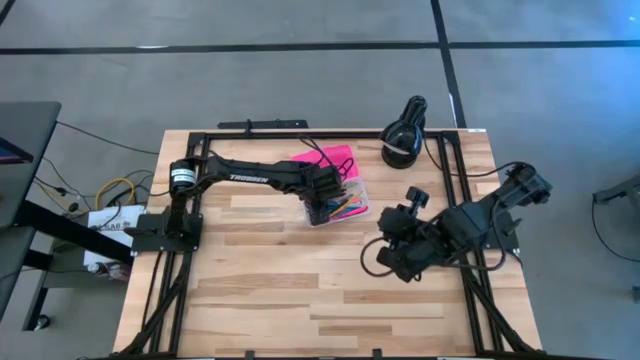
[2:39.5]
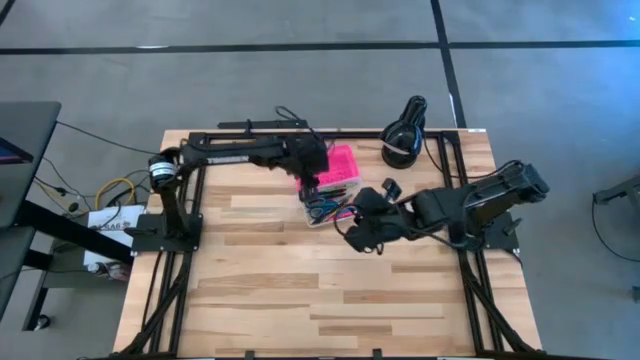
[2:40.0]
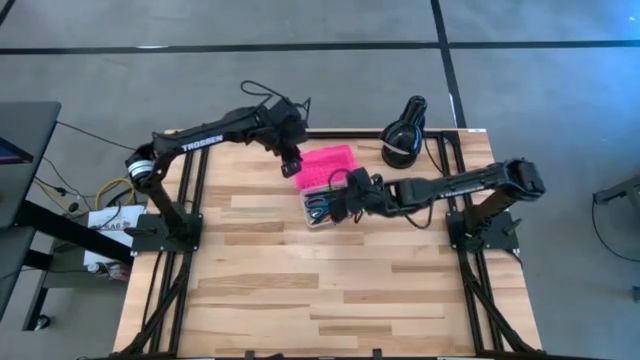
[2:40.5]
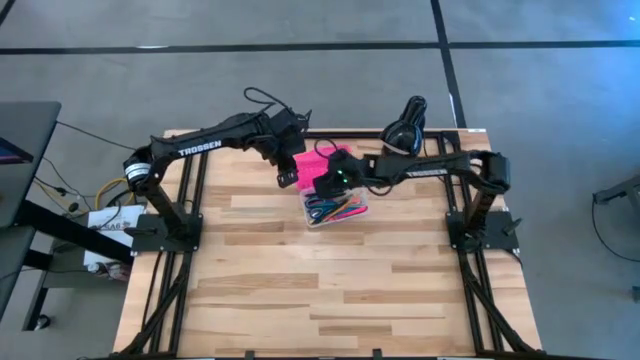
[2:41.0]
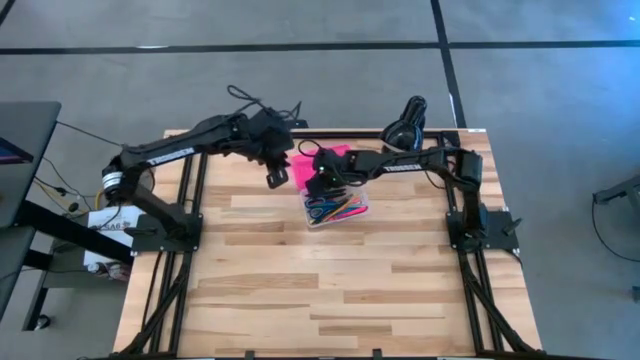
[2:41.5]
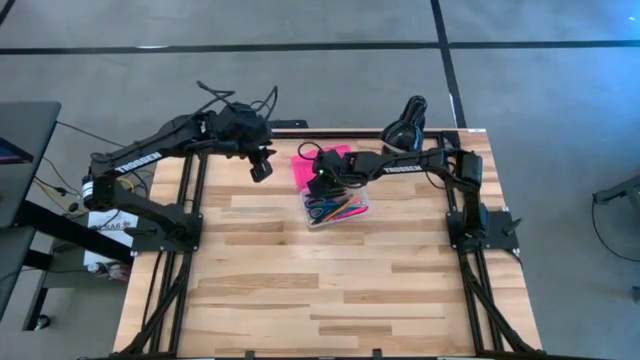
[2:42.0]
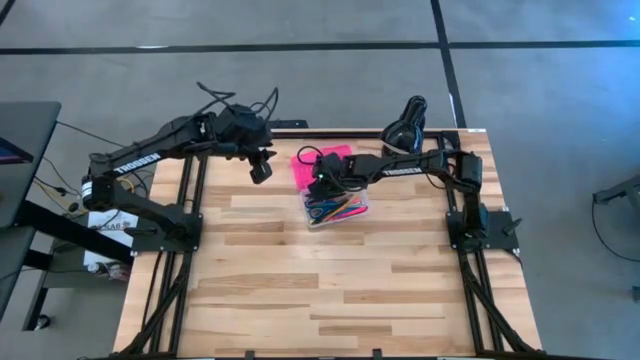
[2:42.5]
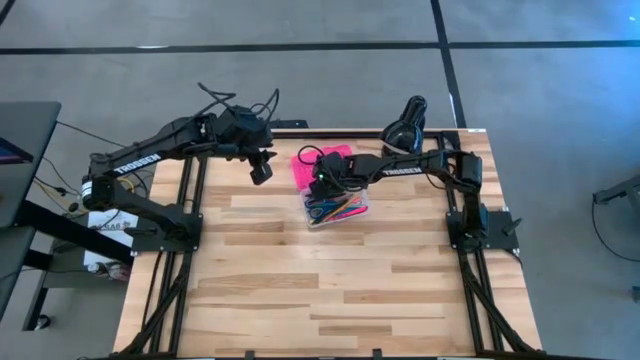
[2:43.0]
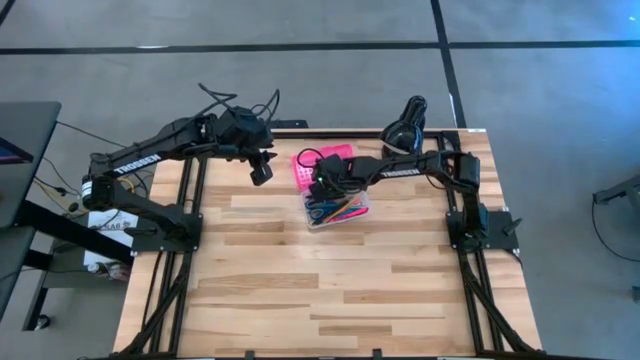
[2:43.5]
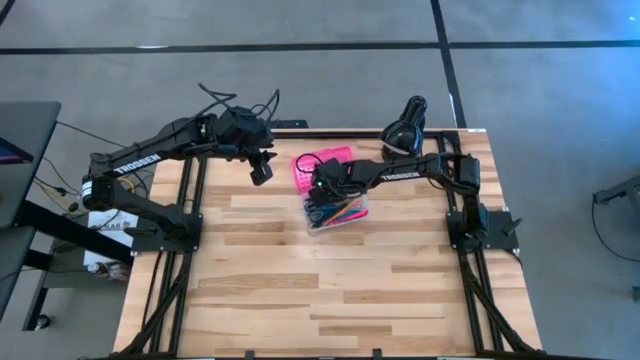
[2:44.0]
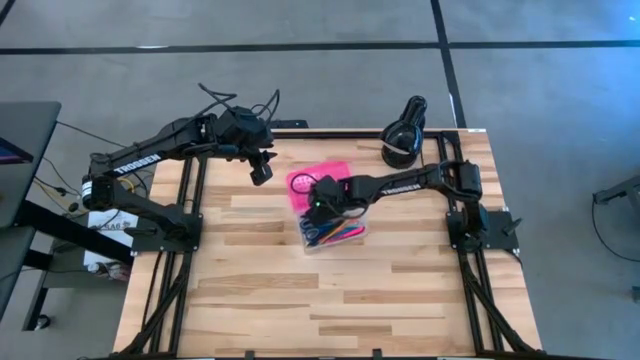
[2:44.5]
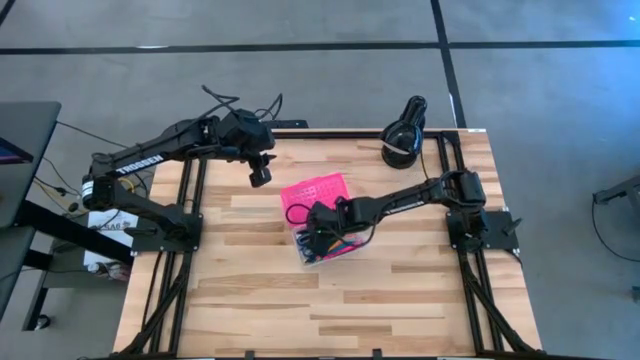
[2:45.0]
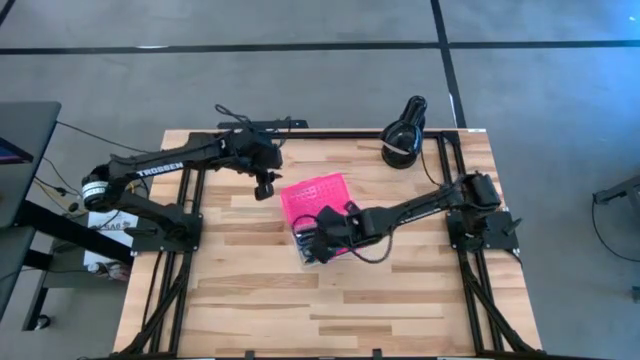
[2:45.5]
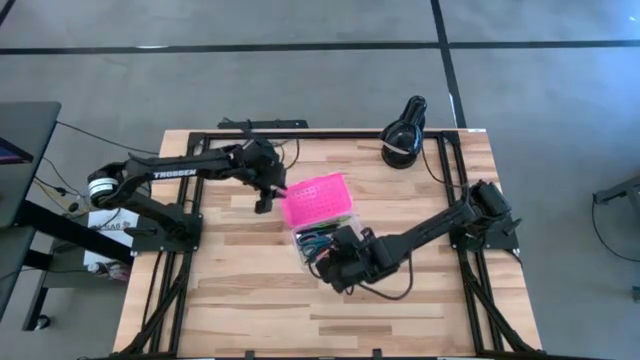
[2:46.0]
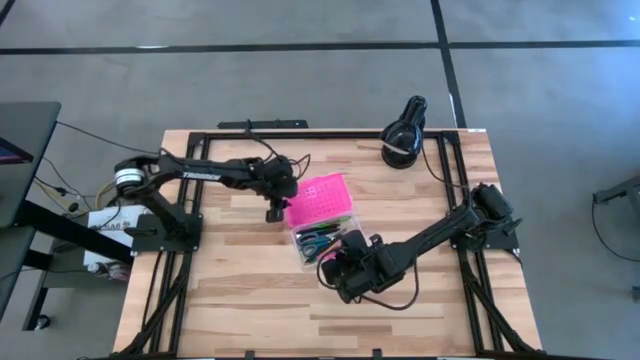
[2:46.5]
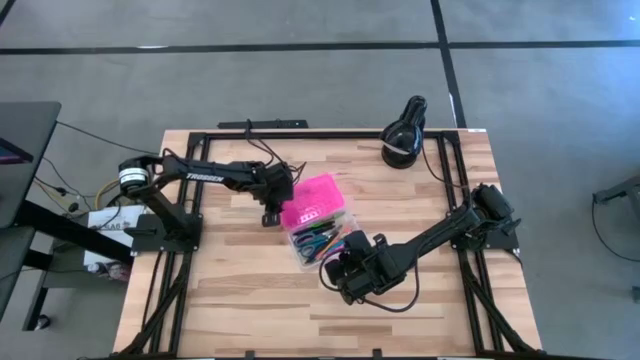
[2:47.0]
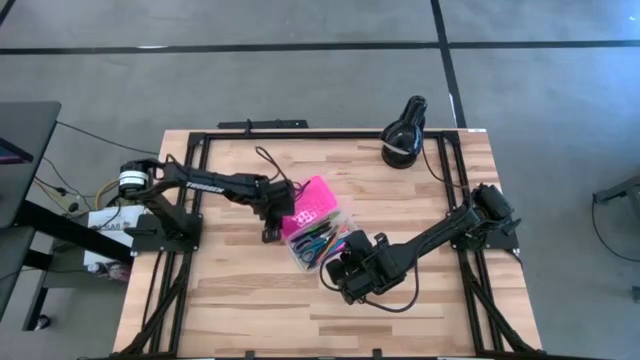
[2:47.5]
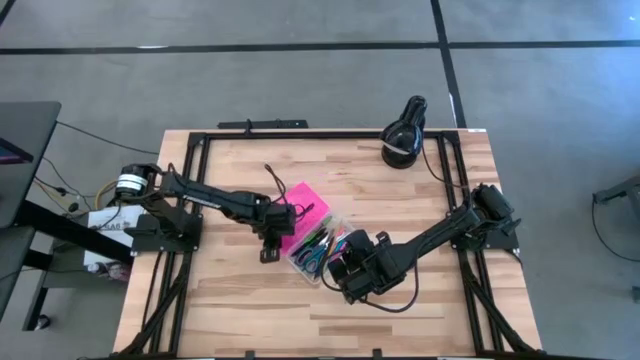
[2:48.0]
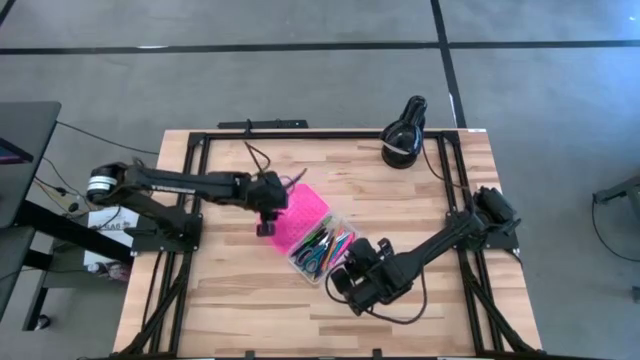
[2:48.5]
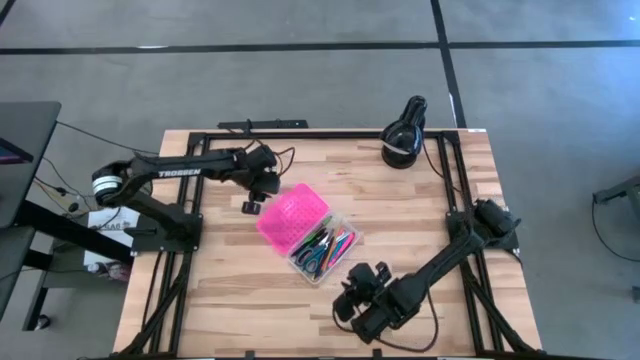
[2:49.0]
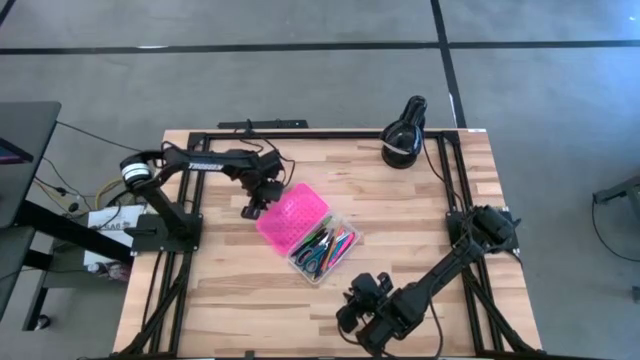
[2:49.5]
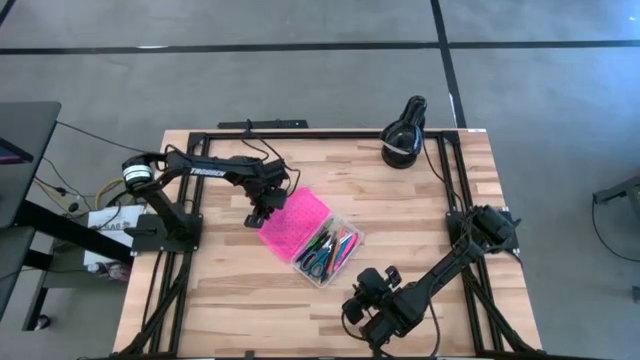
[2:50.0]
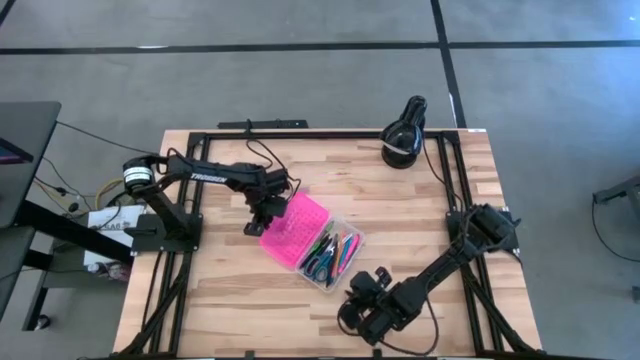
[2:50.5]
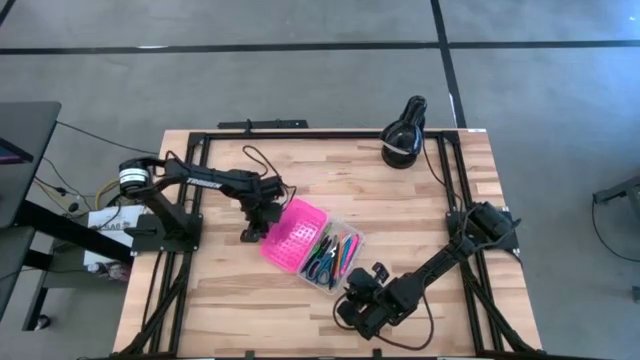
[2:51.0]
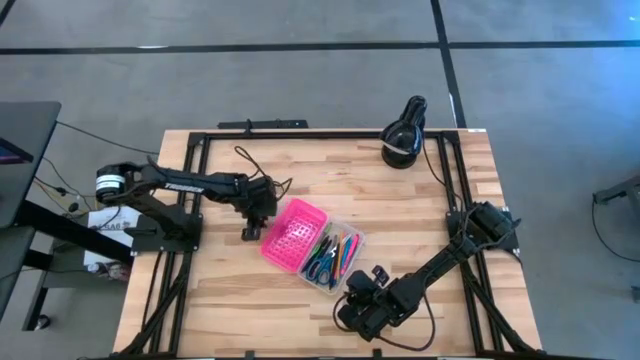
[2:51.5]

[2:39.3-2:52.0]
Task: Pick & place school supplies into a supply box
Close the pink supply box

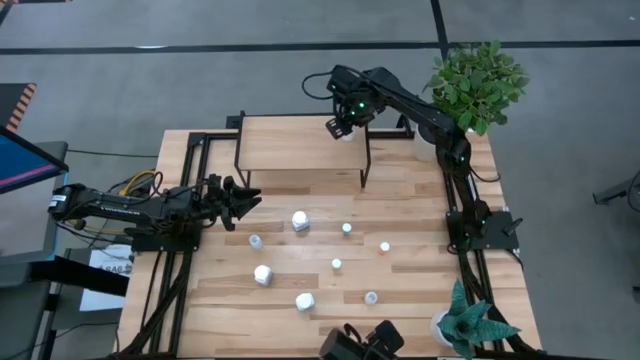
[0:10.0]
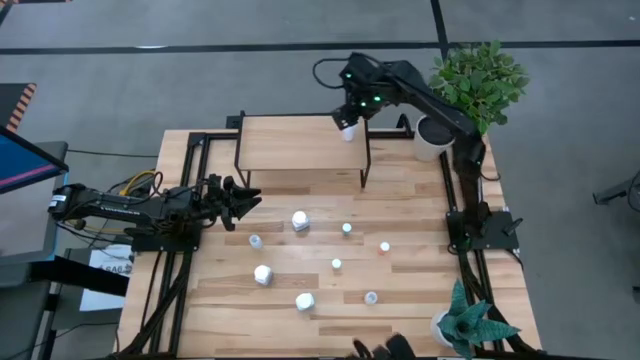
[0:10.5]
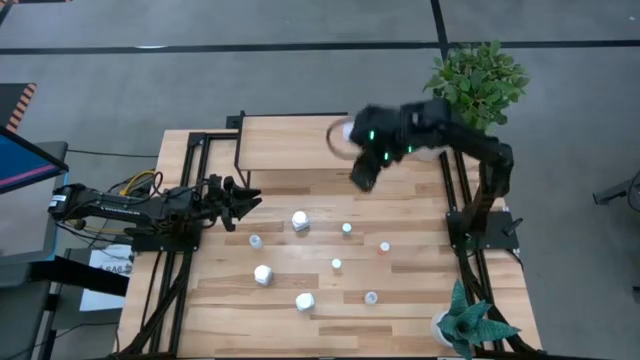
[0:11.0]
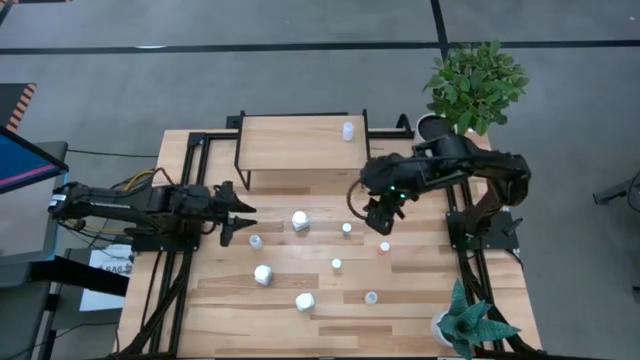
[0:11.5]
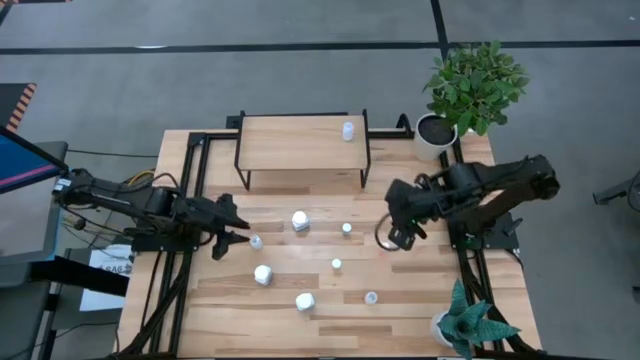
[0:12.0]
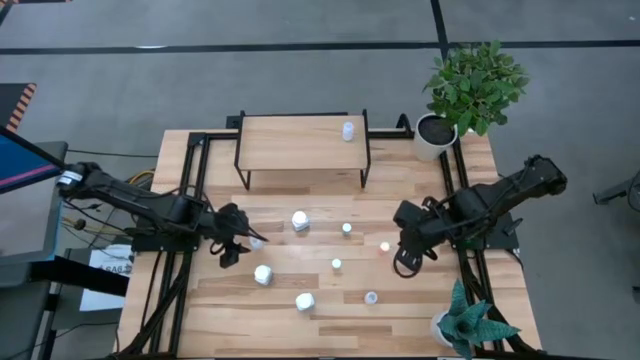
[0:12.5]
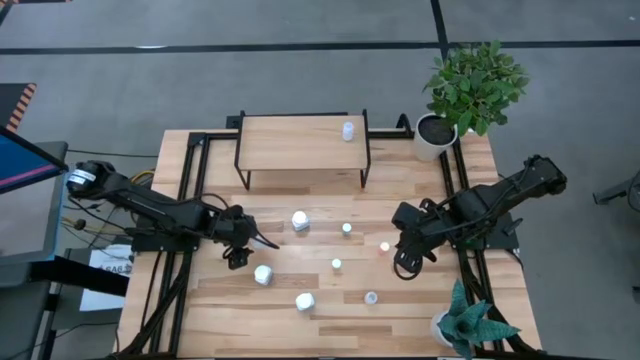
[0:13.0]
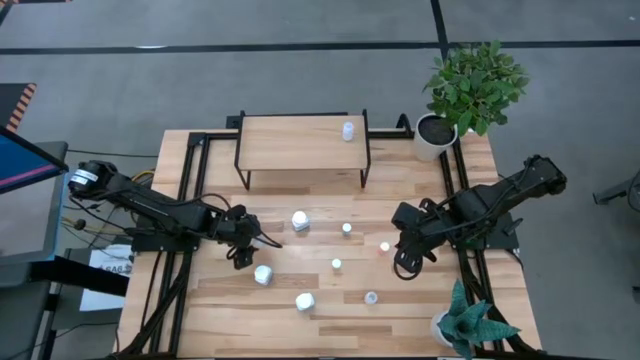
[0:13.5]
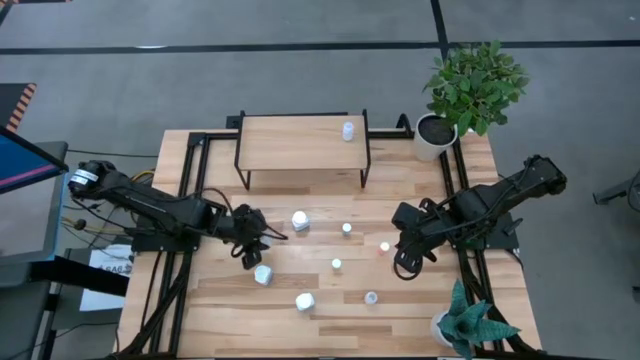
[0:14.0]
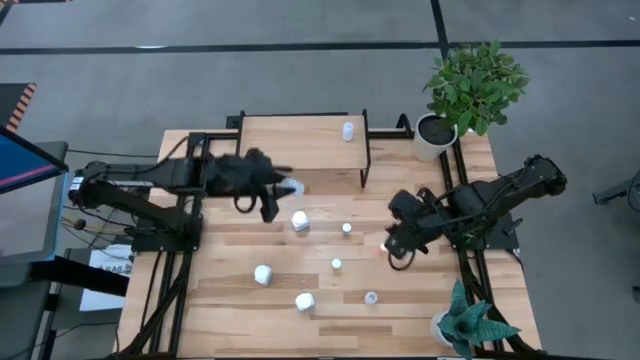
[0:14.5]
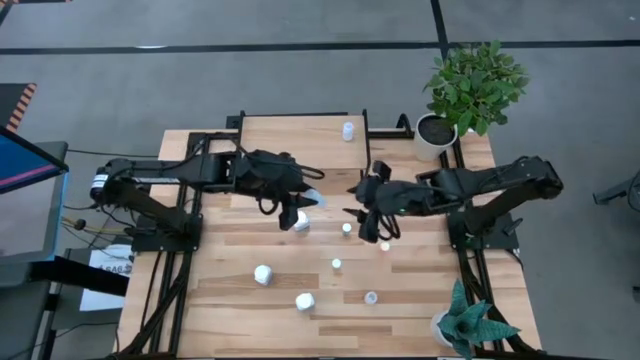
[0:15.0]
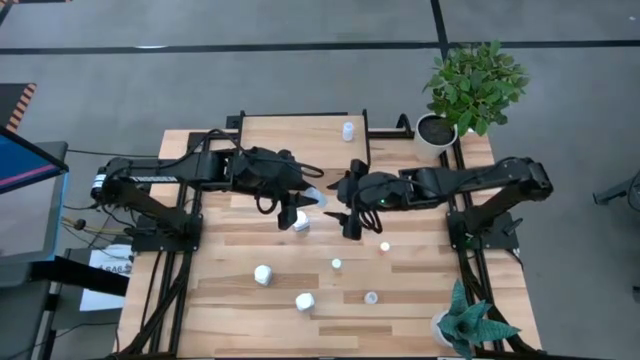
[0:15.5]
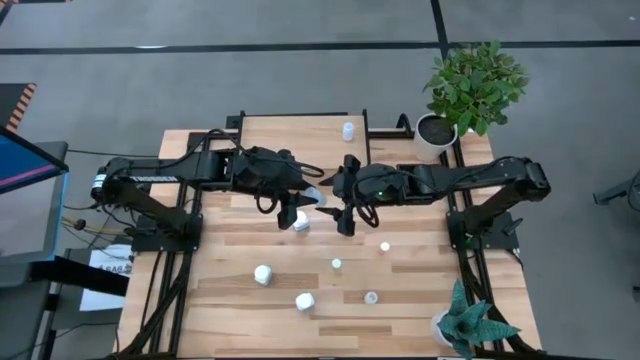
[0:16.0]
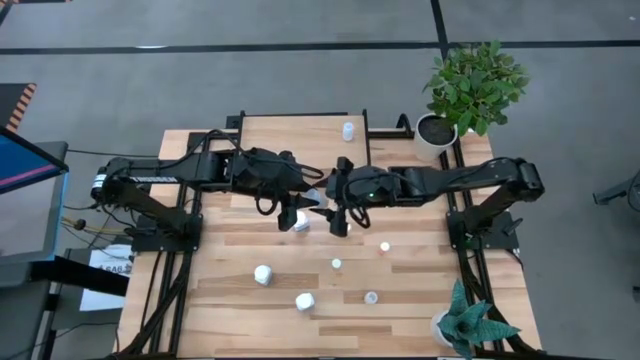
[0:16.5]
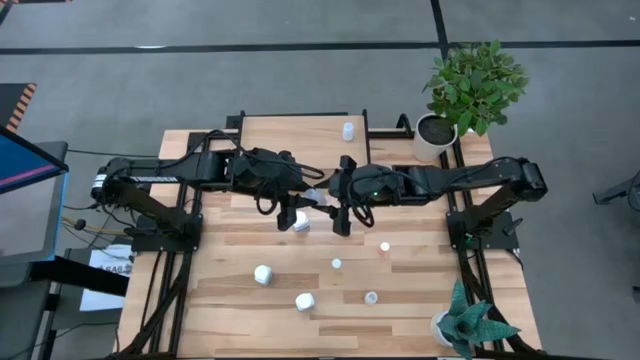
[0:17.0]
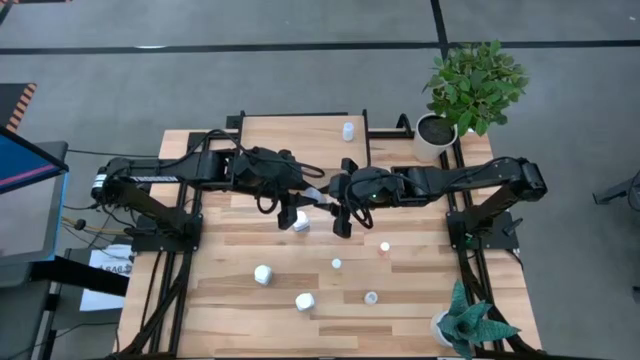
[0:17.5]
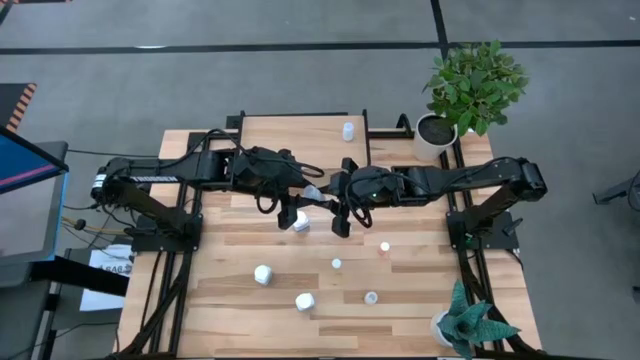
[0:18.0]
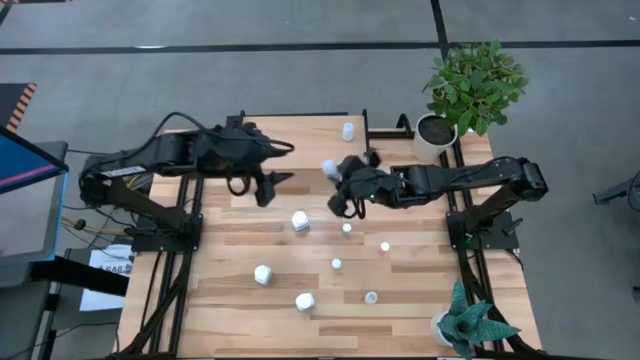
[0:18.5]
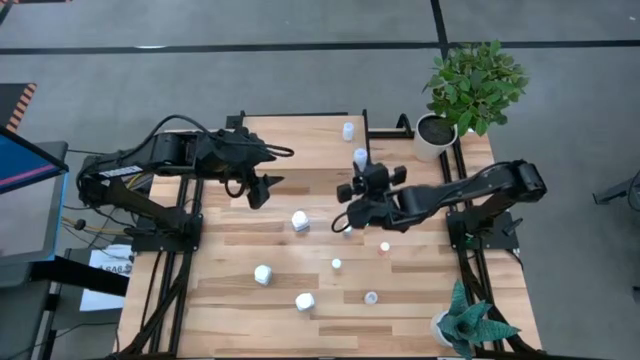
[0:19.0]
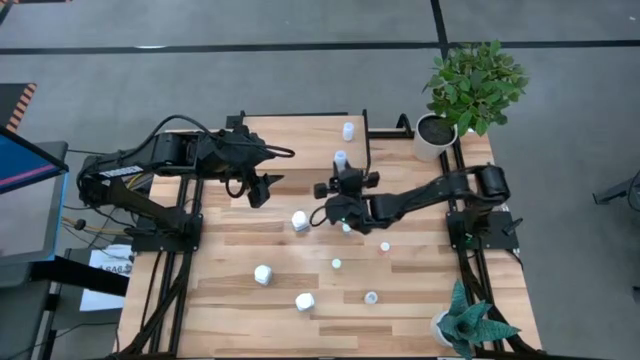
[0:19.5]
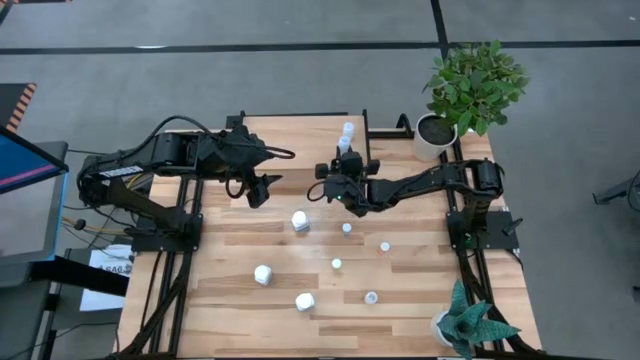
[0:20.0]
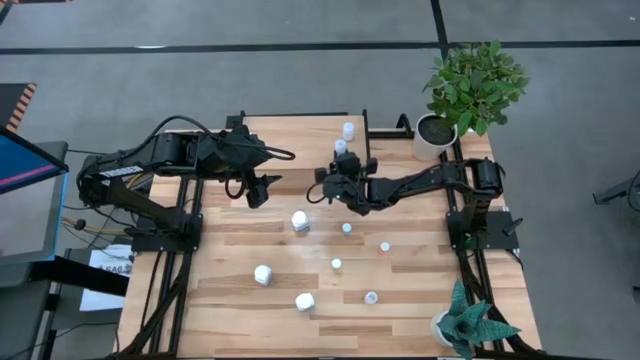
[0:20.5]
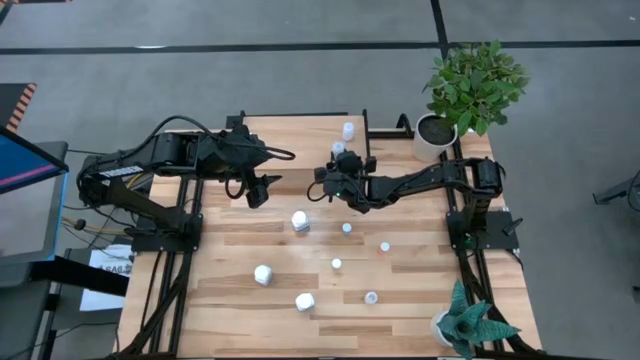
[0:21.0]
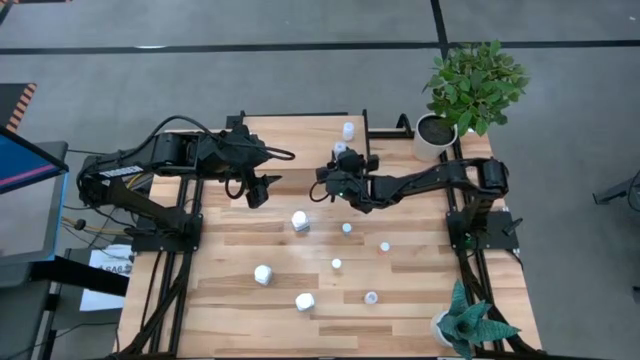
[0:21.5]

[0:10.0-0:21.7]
Task: Pick and place medicine bottles onto shelf by color
Put the left transparent medicine bottle on the shelf
